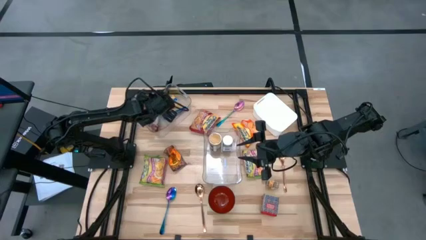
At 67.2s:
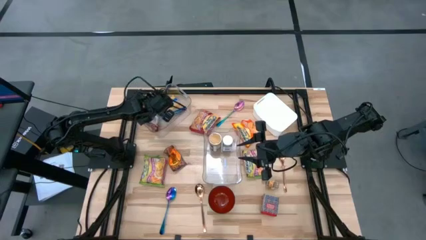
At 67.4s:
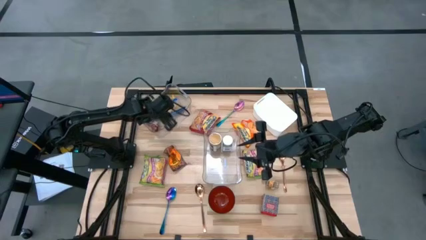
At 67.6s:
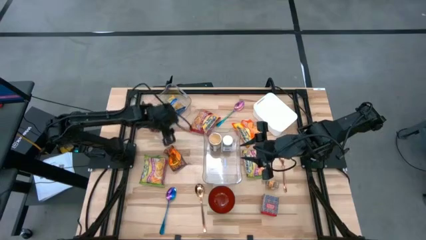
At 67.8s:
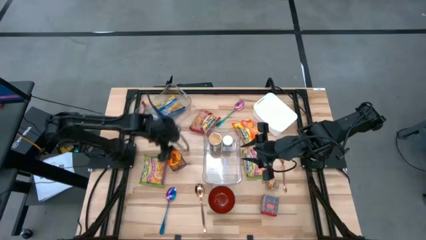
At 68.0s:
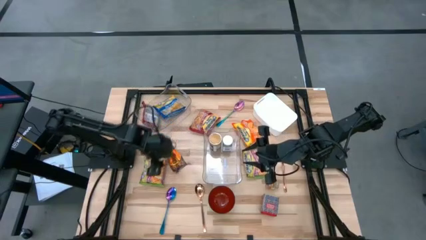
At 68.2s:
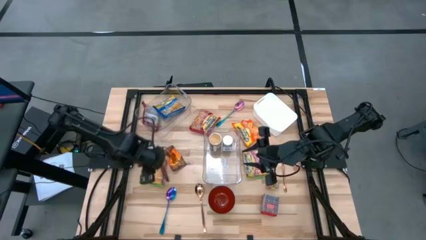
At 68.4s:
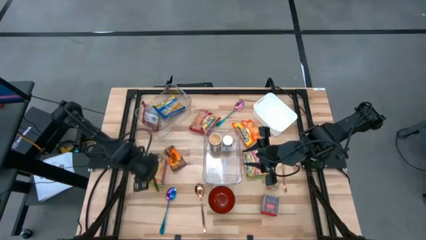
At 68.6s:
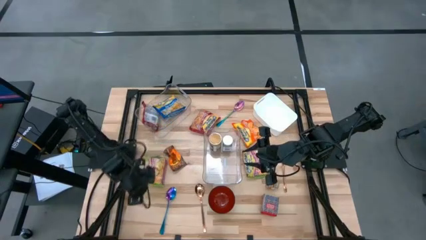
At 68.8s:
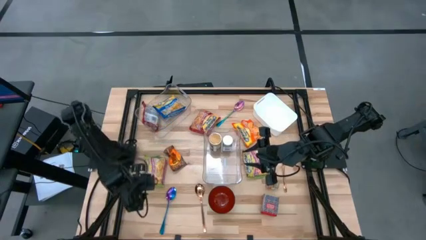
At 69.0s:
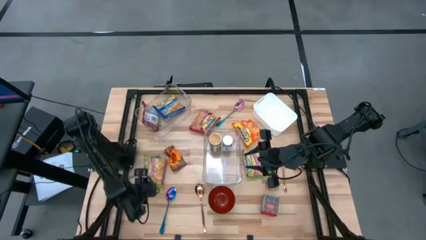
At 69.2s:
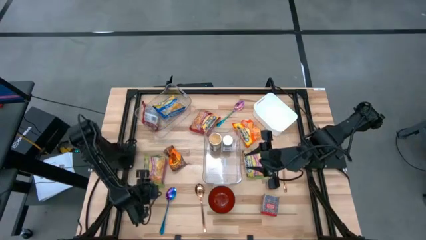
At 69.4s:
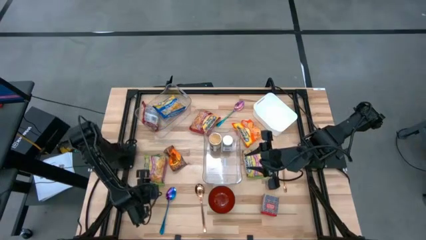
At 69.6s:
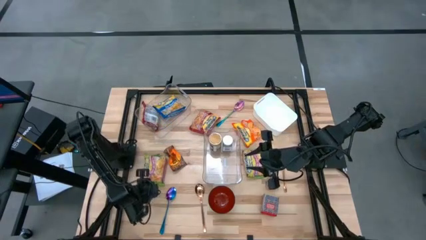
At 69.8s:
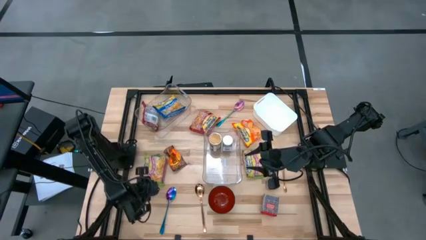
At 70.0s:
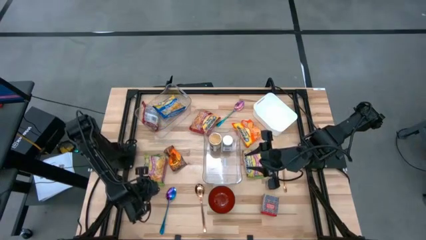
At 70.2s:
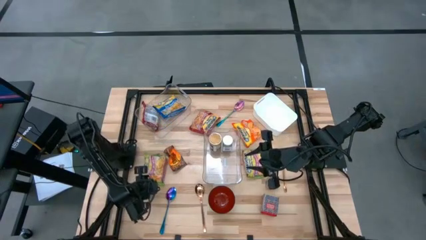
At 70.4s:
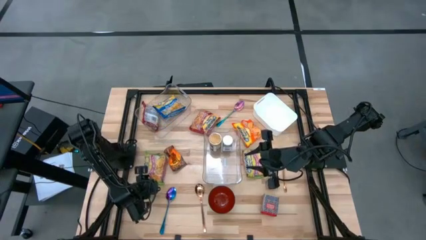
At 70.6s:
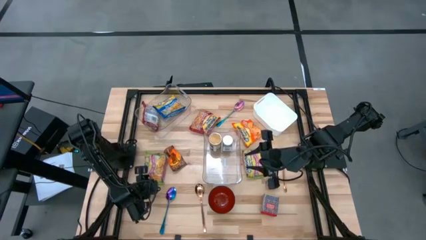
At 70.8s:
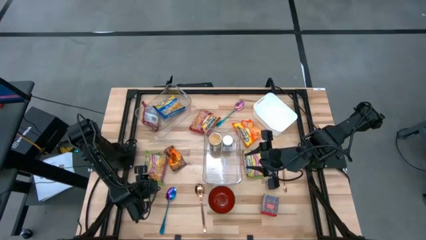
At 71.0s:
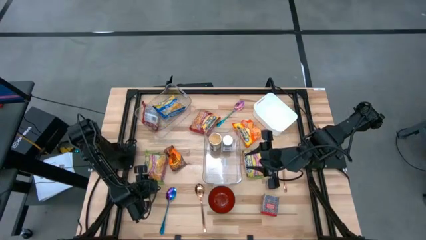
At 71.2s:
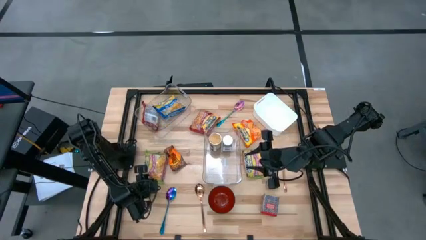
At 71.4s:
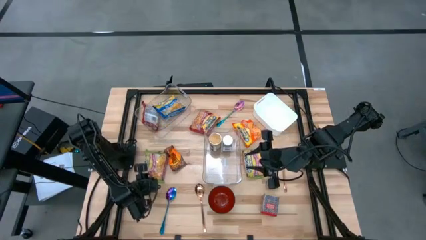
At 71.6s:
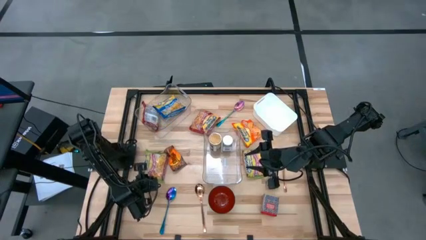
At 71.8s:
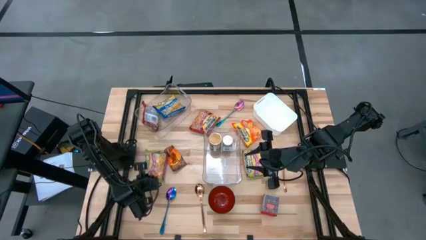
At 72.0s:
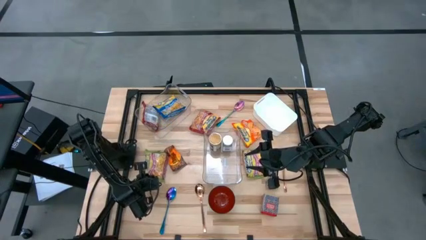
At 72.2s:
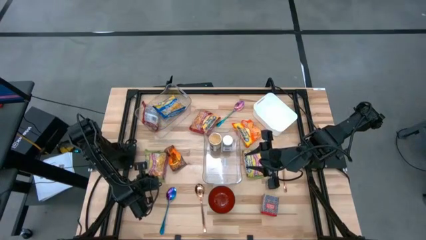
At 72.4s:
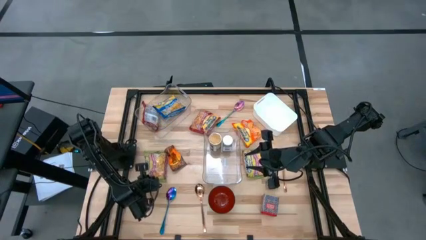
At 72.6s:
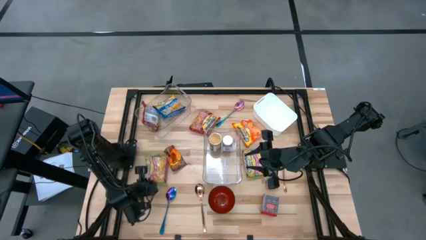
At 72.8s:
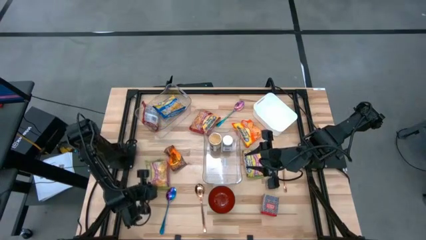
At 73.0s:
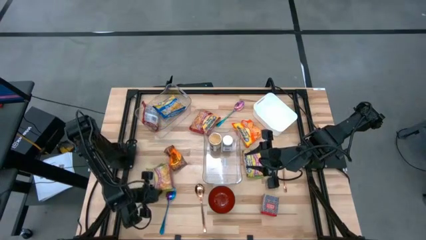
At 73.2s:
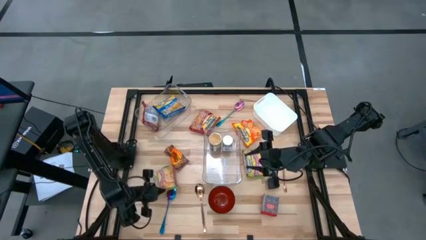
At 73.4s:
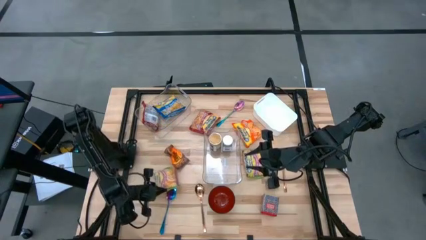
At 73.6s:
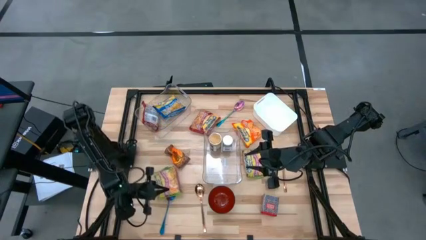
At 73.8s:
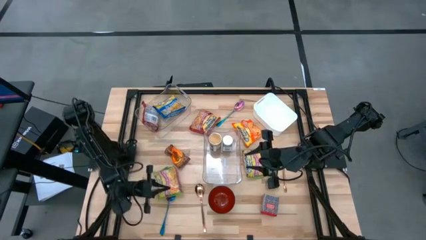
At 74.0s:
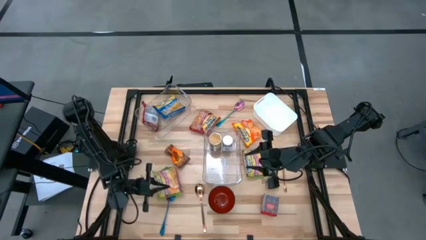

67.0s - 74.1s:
Task: Pick & Place Food Item
Put the left green noodle pack into the top transparent bin

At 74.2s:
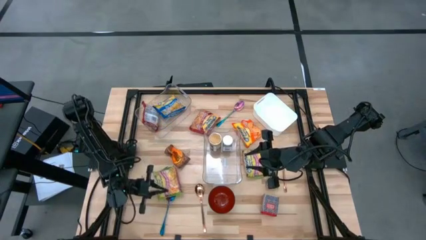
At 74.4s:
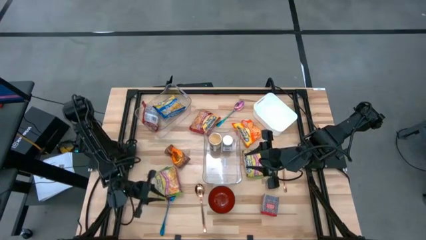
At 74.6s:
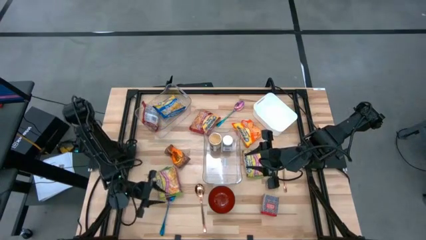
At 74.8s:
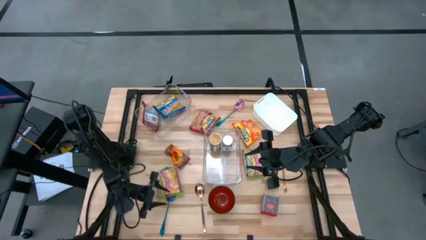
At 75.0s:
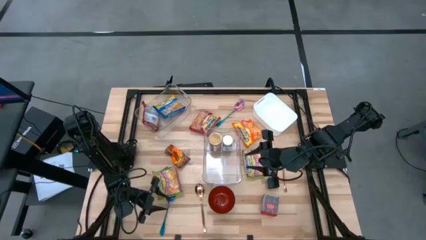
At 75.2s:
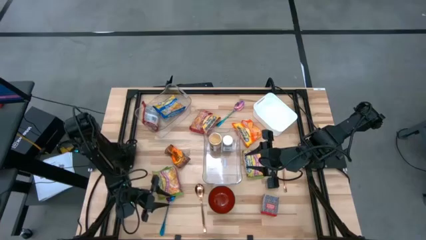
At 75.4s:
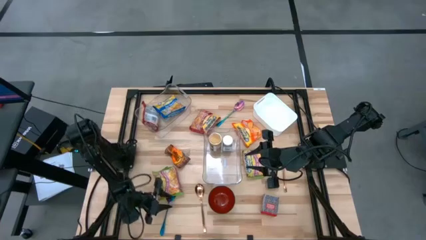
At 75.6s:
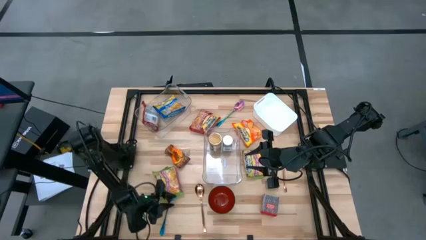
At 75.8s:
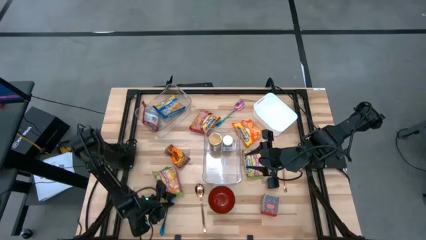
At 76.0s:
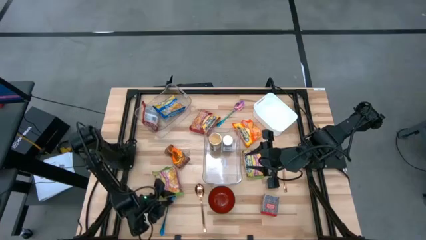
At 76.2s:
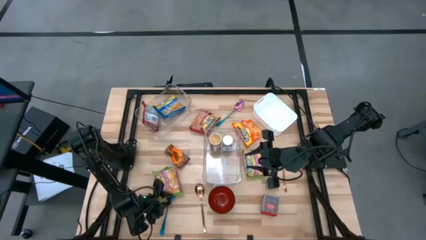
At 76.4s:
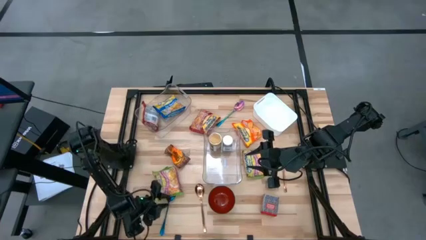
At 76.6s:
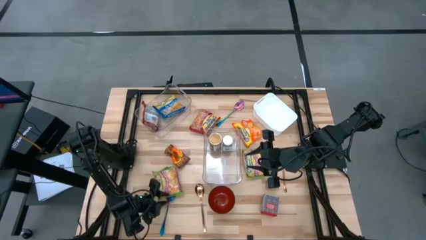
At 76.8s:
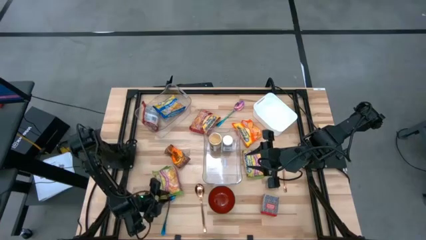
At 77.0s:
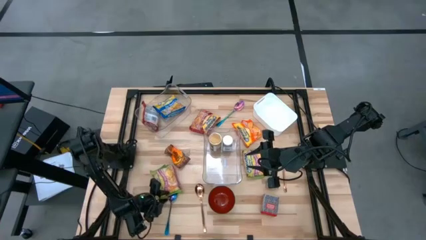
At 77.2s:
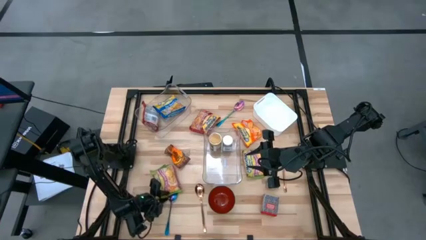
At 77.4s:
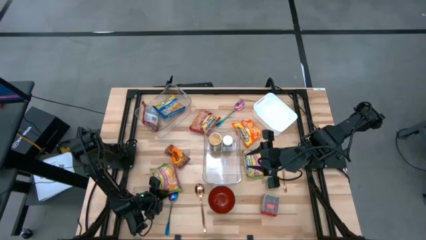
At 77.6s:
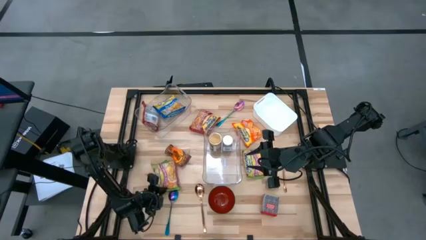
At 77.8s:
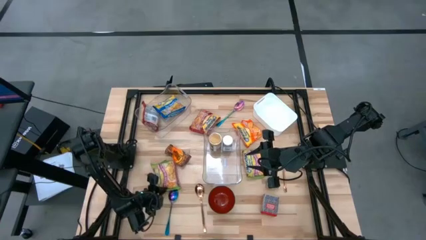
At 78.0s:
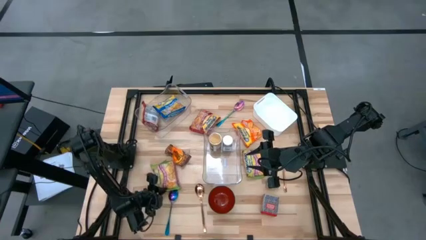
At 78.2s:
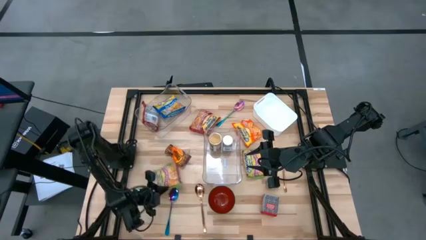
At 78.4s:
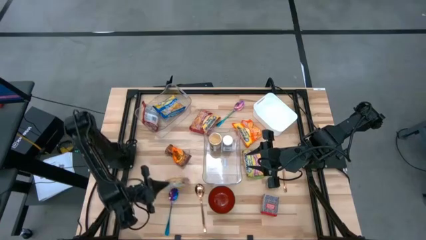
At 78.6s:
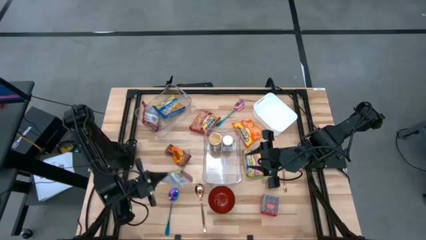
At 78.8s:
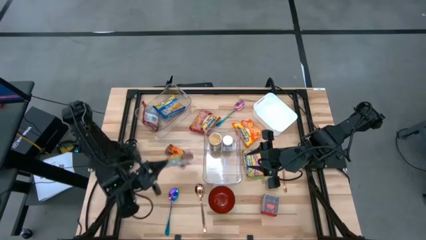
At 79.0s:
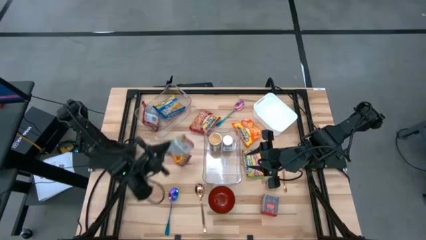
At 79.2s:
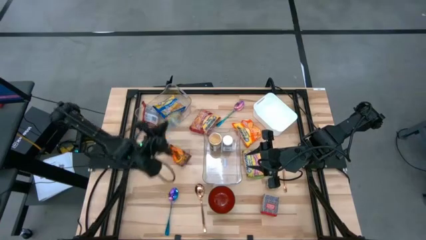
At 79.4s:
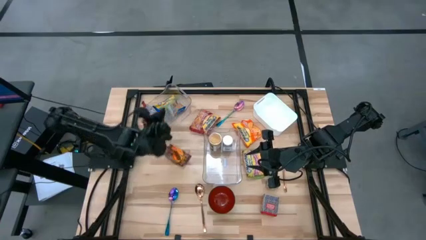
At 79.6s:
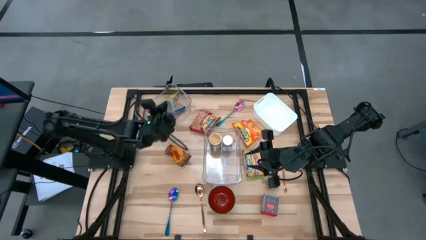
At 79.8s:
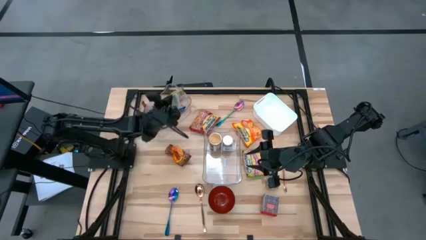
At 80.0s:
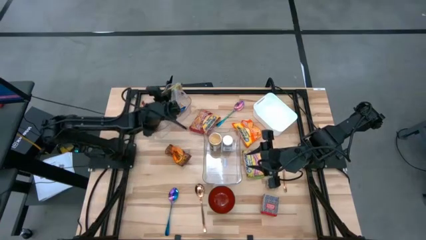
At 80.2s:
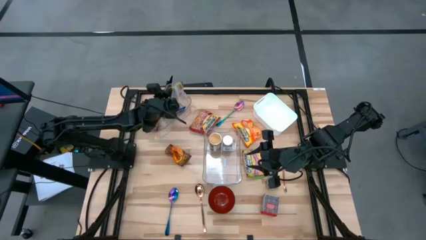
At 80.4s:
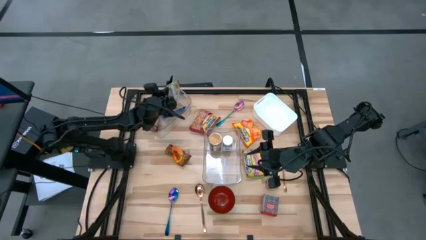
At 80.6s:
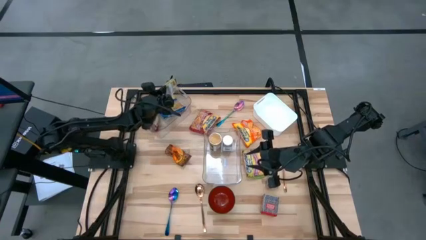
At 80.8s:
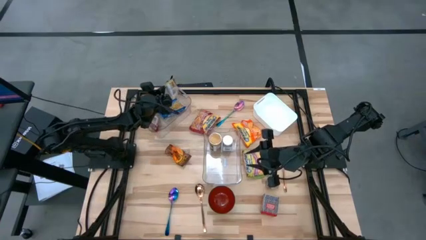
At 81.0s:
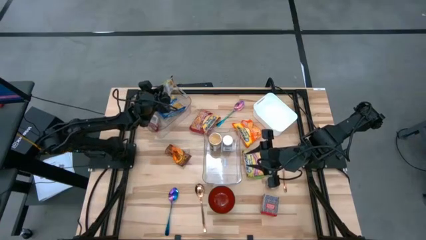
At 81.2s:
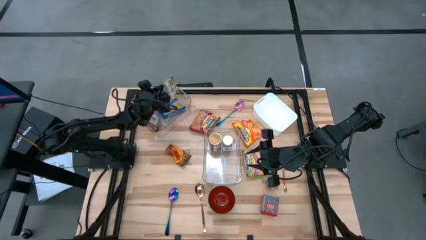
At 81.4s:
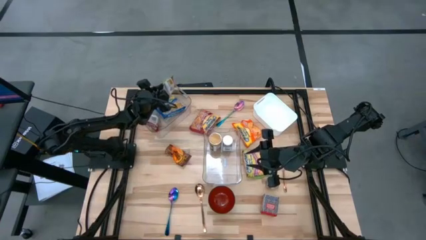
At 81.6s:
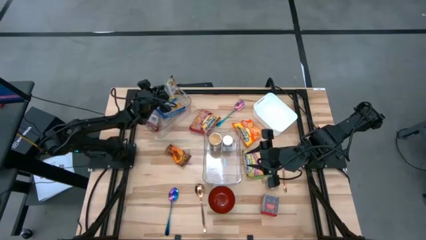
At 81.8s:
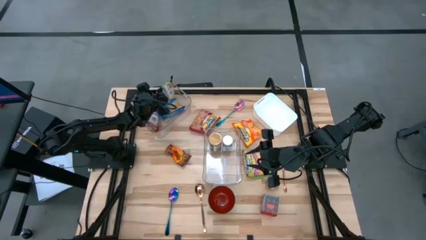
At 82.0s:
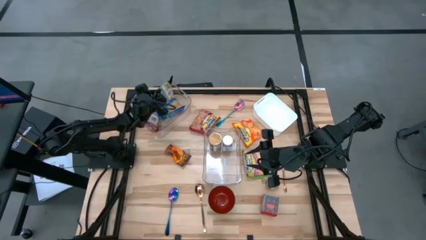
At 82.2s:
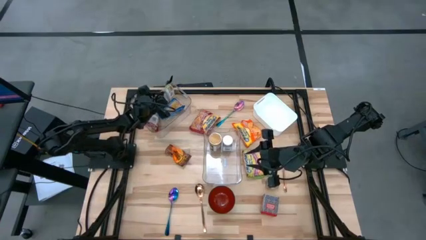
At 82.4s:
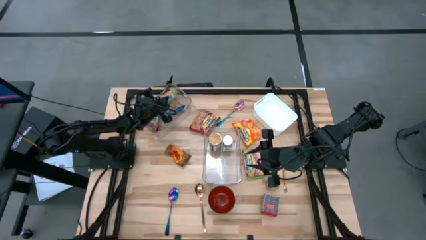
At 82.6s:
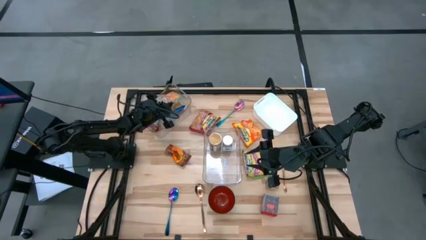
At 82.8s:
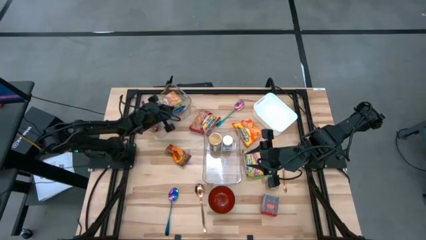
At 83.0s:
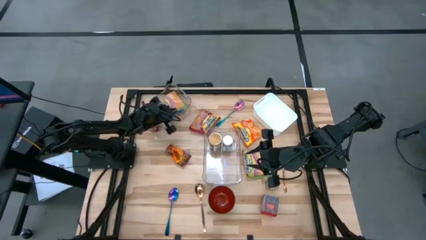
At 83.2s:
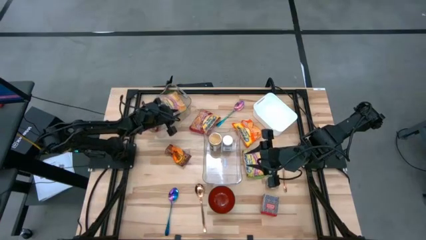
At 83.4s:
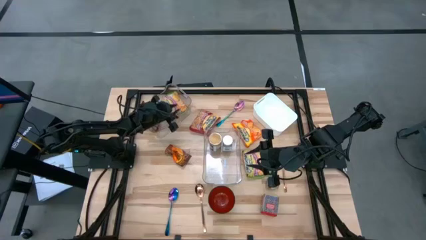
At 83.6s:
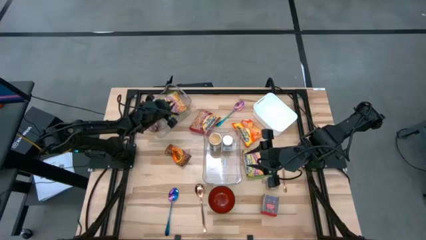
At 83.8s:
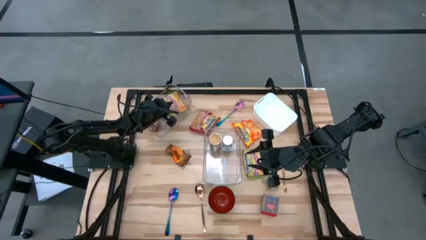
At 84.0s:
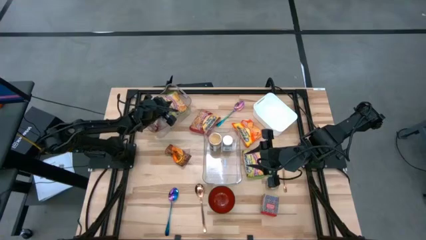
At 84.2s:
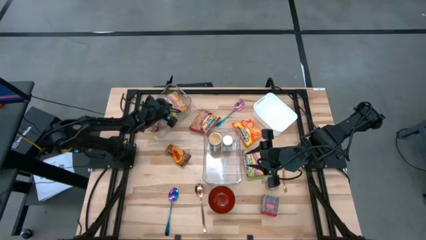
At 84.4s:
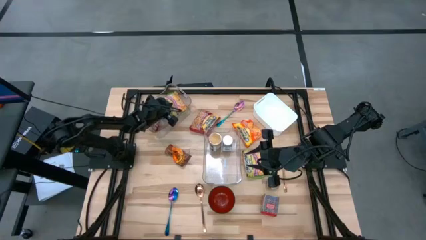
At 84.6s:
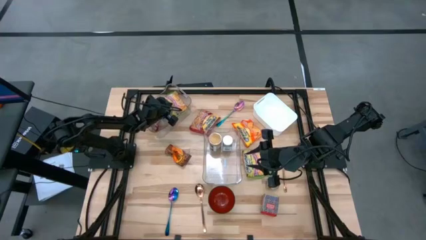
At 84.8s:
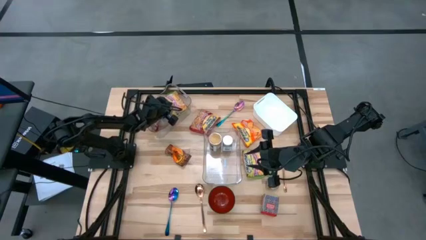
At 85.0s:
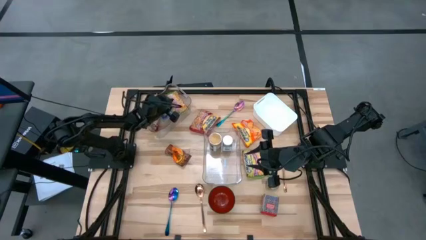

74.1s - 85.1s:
Put the left green noodle pack into the top transparent bin
